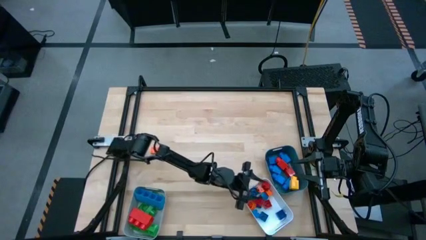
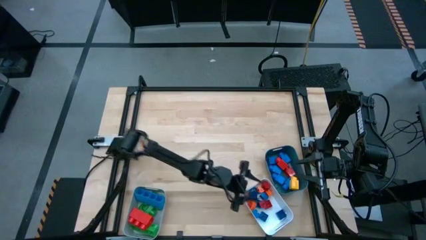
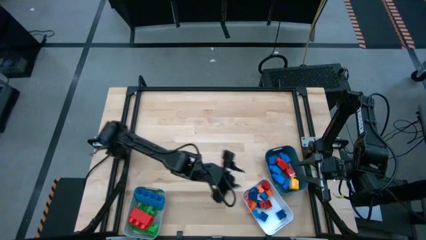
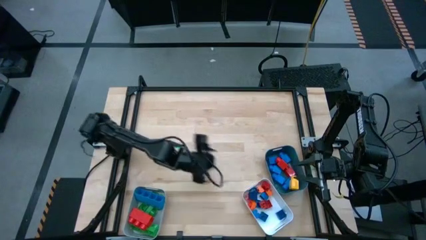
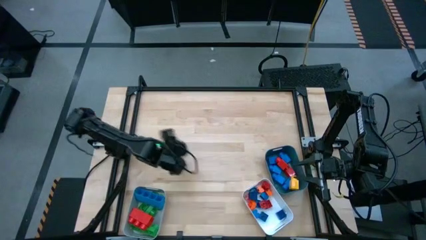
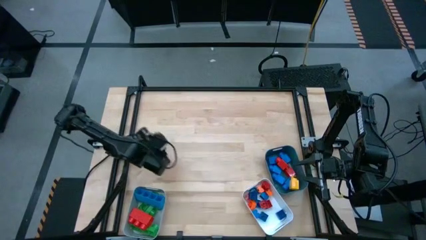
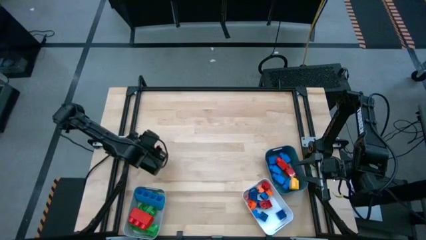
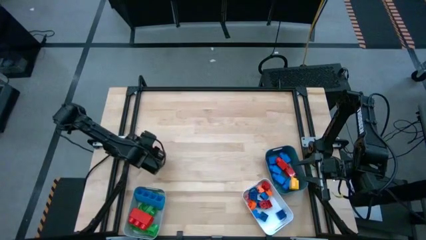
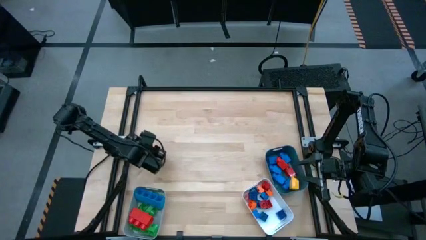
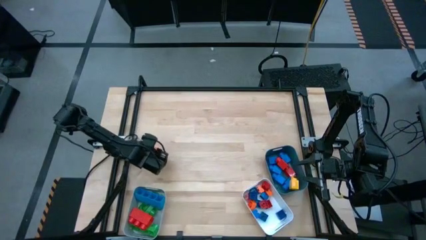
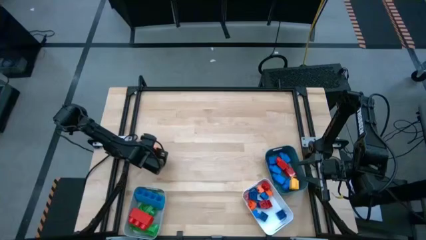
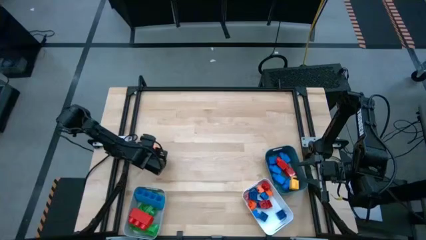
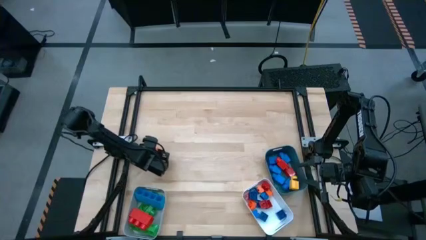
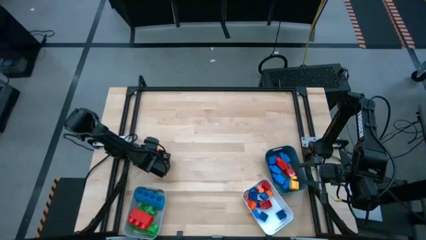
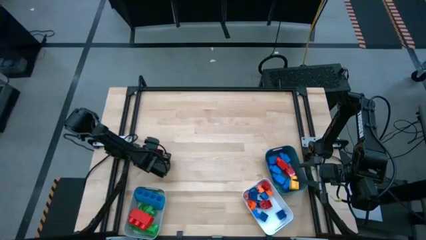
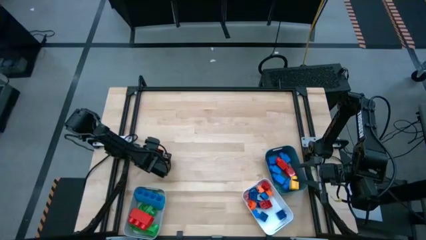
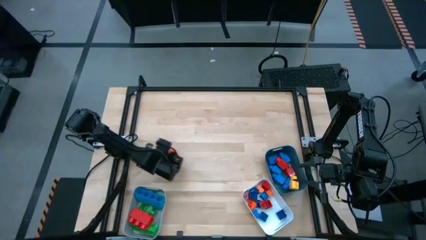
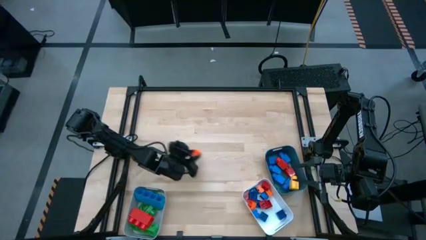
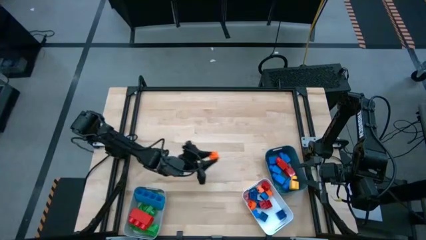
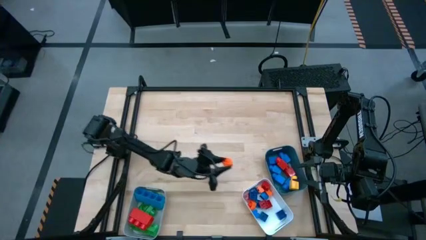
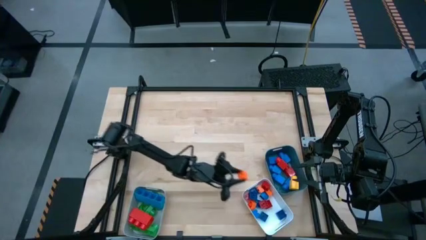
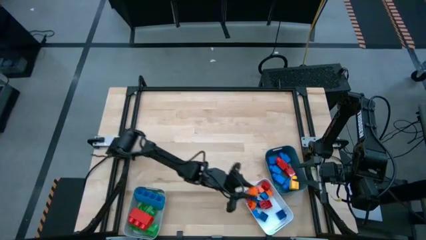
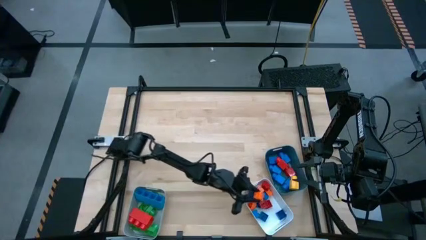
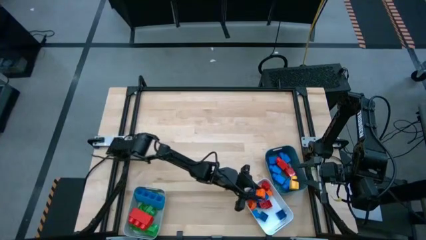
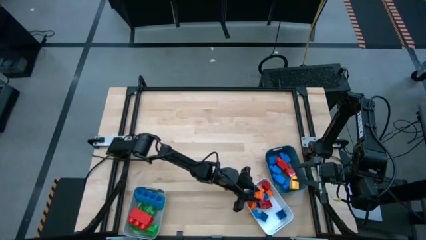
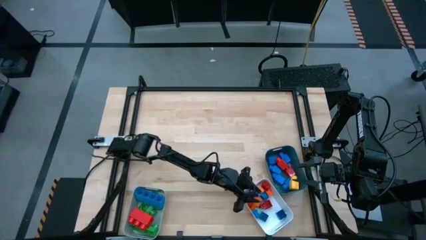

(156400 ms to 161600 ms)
Task: Sort blocks by size
Put the small square orange game piece into the white bin

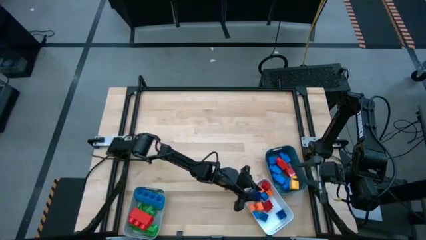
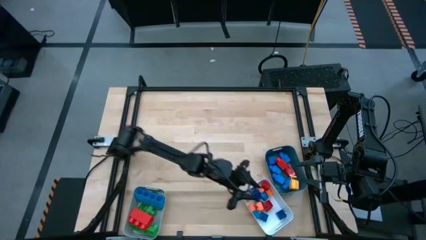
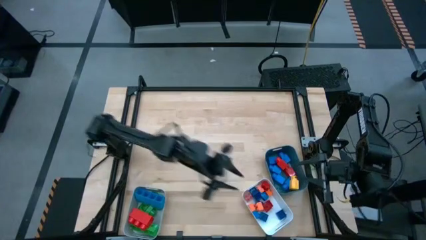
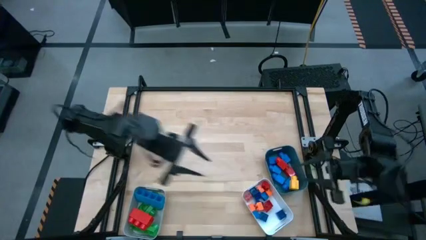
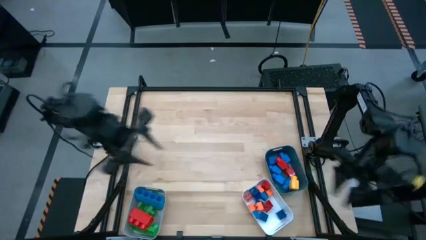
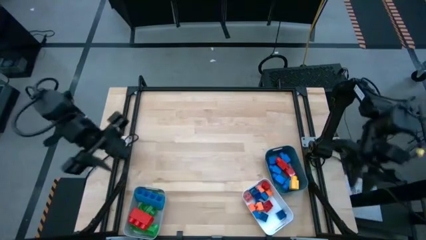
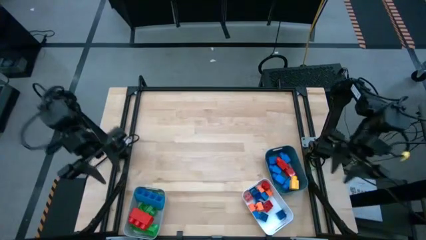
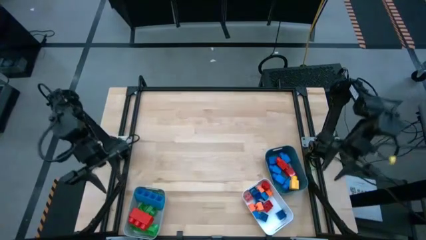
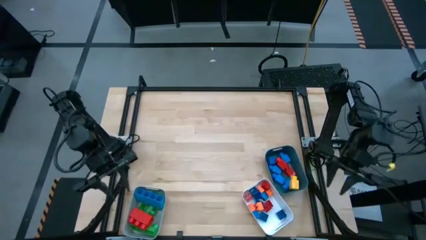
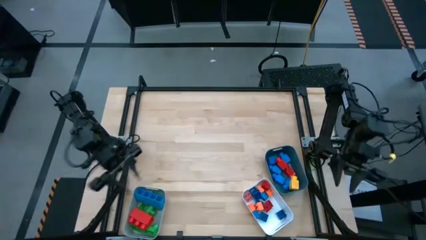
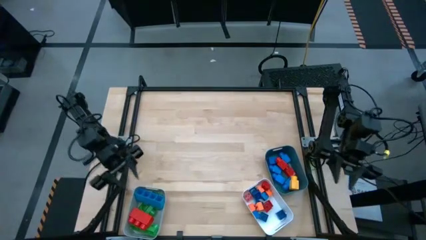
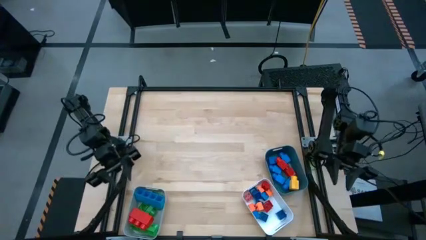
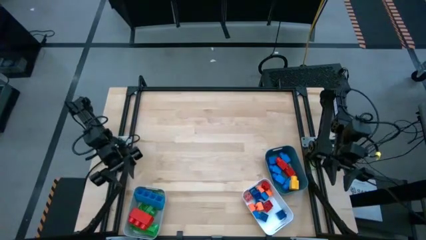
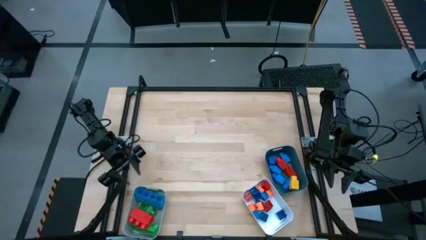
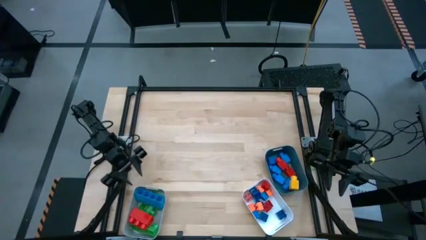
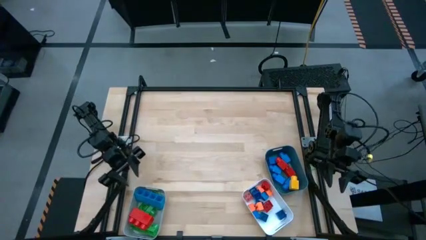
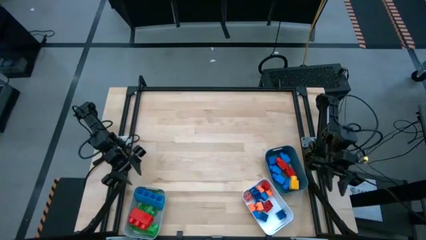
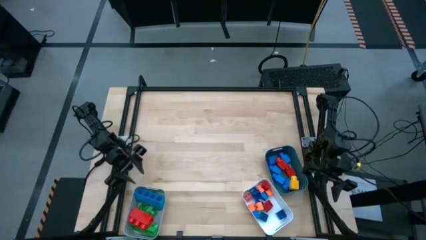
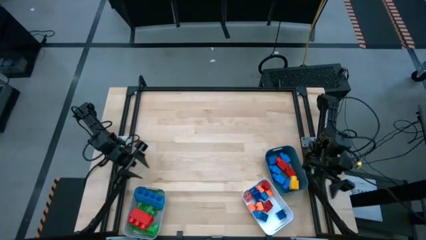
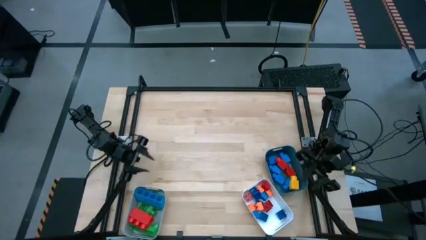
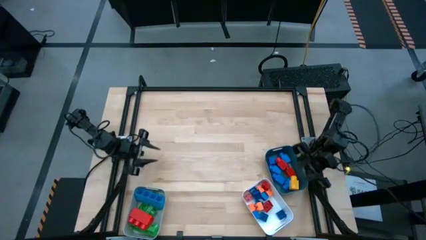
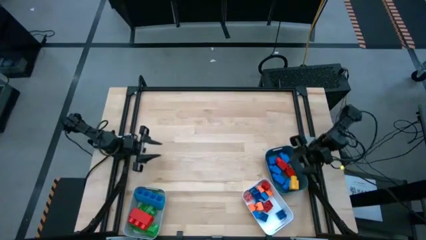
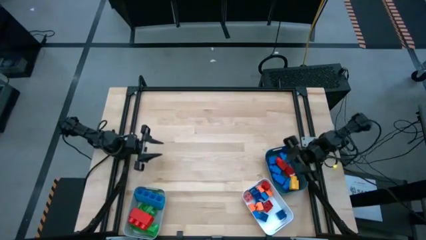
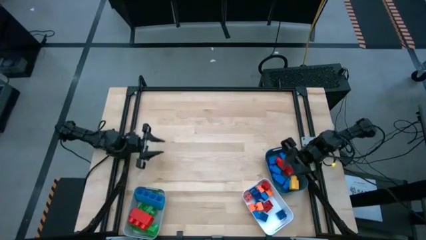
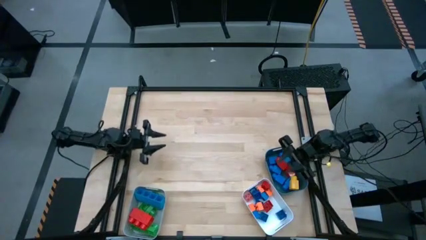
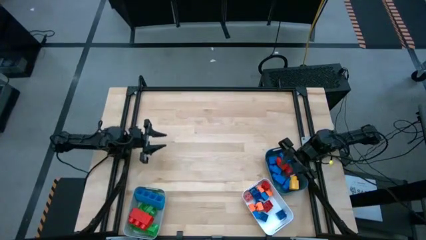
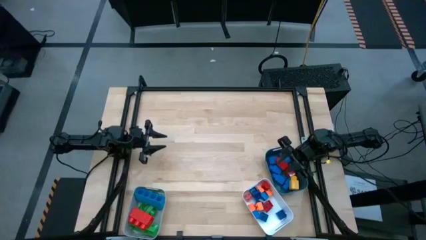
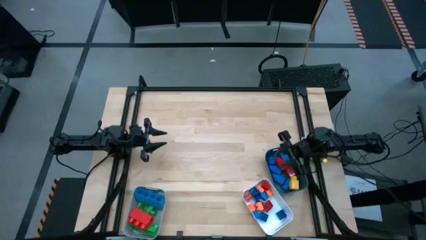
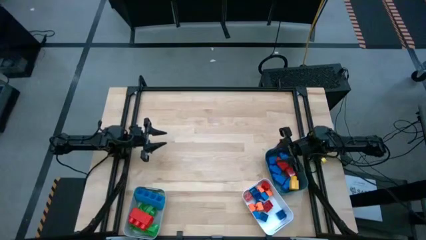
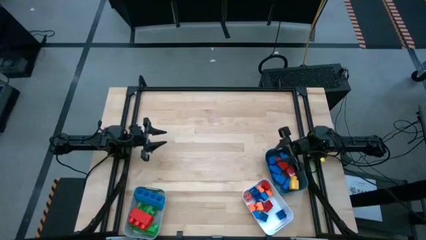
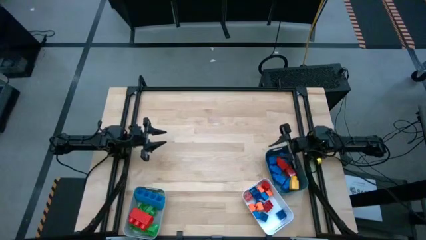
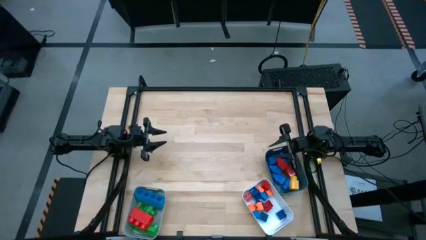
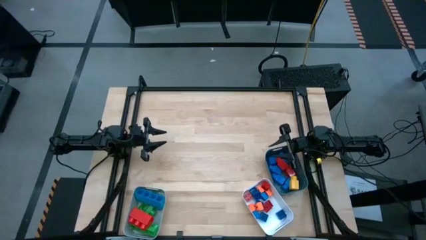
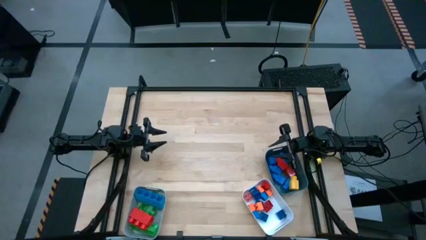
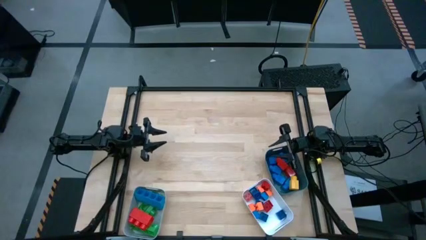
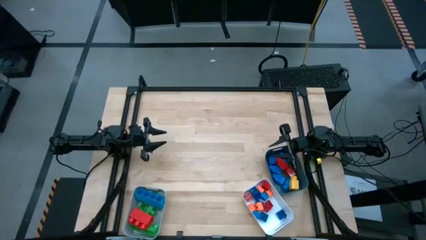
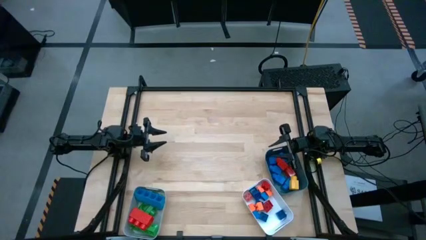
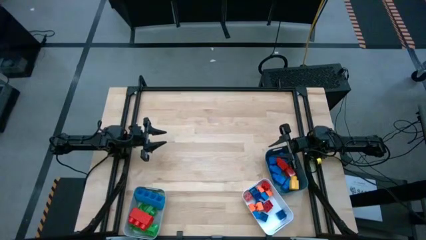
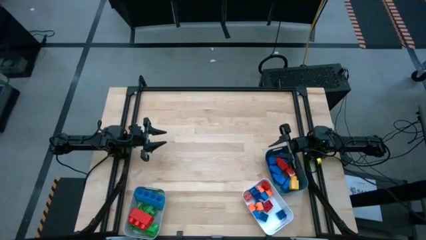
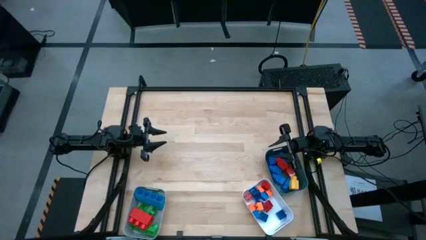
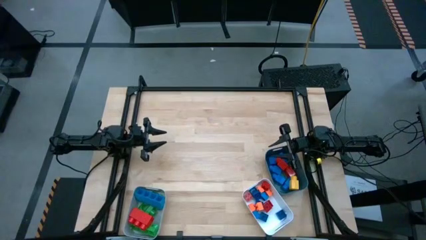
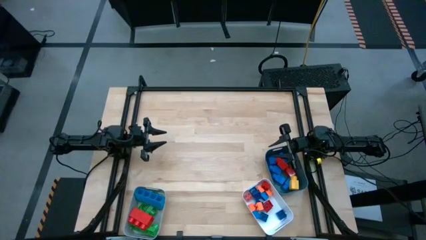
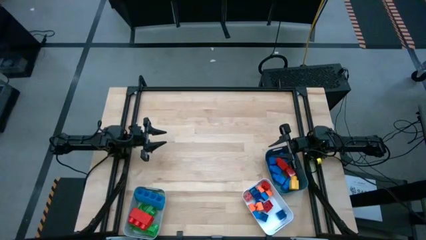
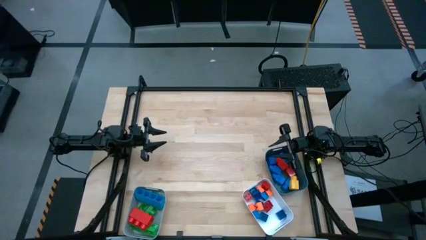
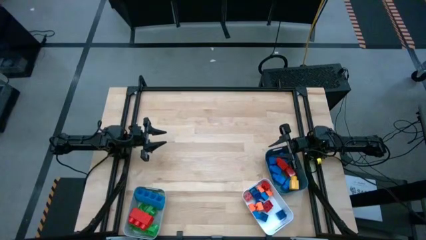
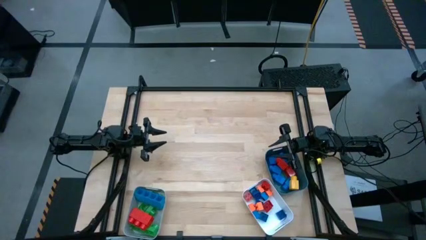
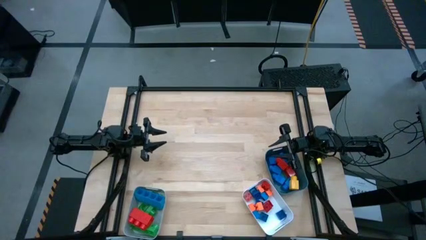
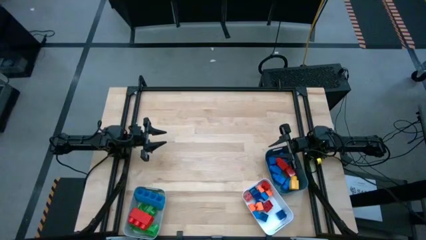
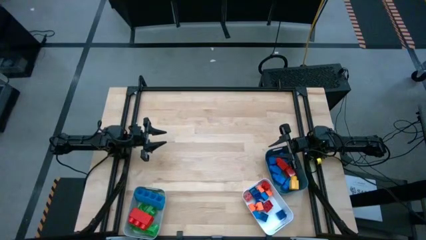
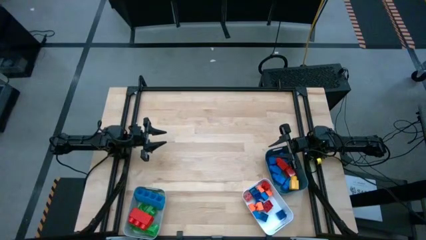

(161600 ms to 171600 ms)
Return to Home Position

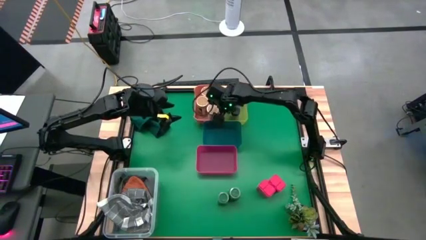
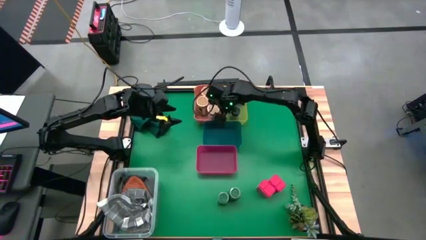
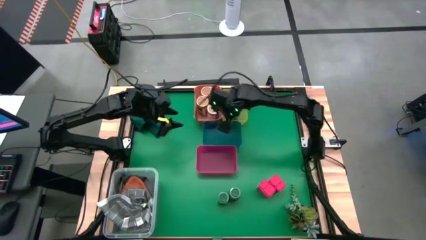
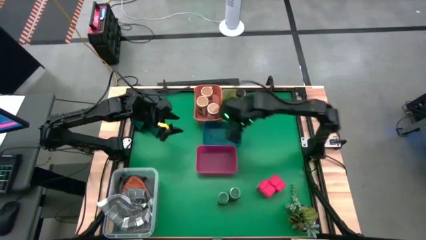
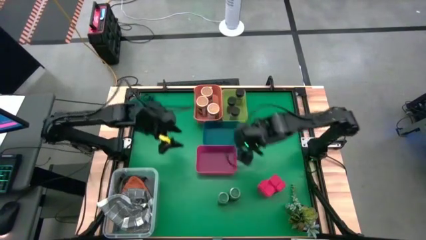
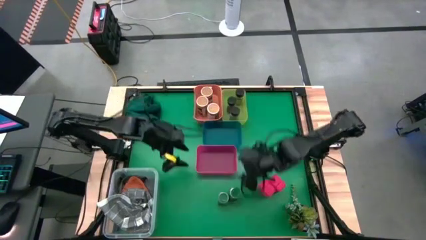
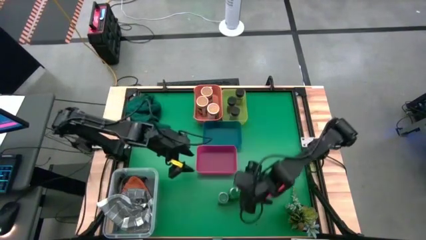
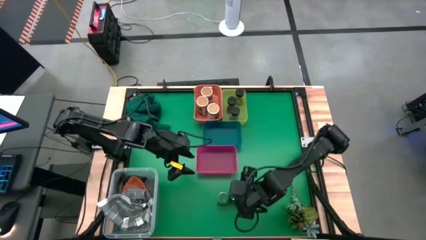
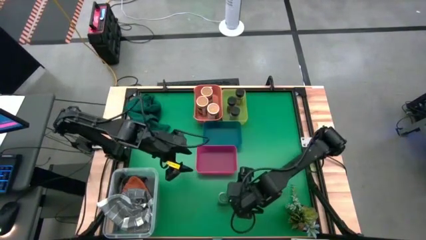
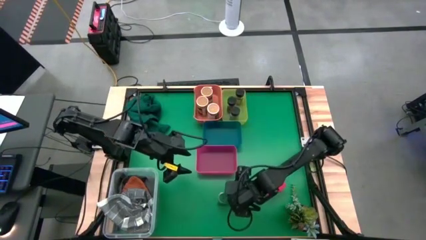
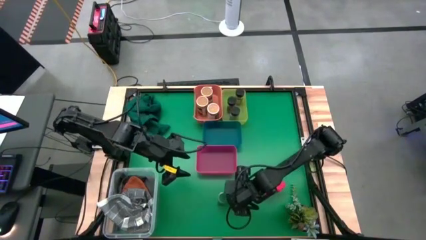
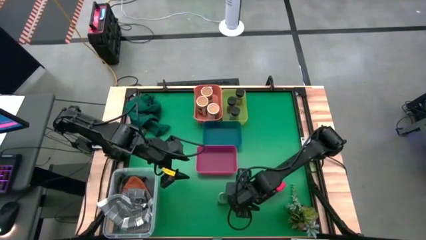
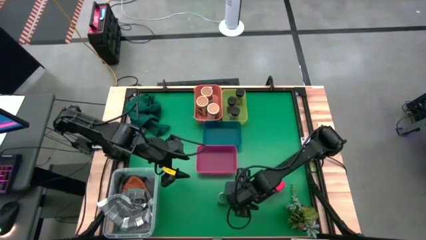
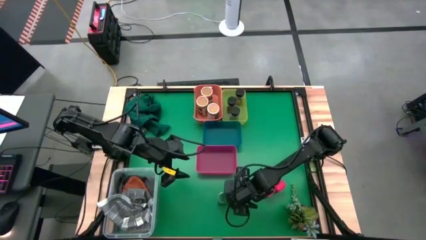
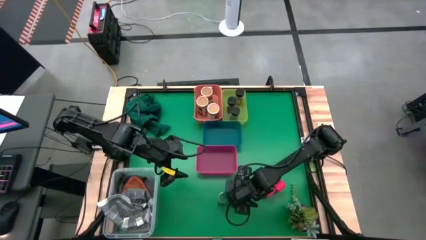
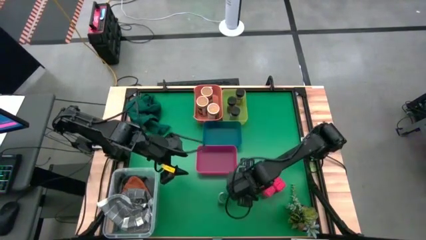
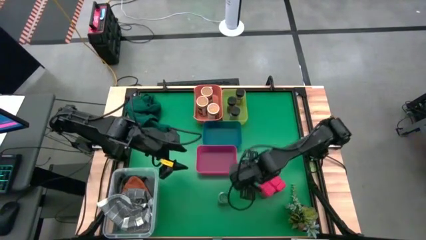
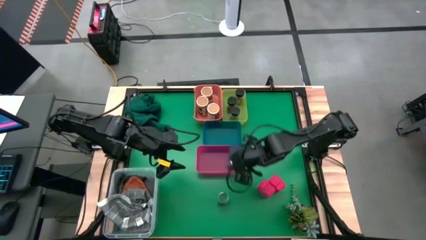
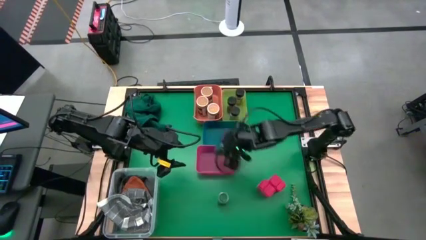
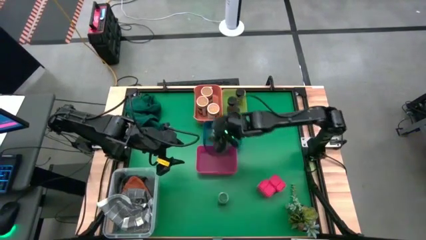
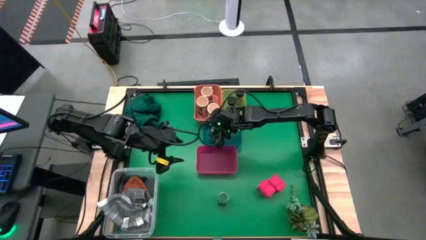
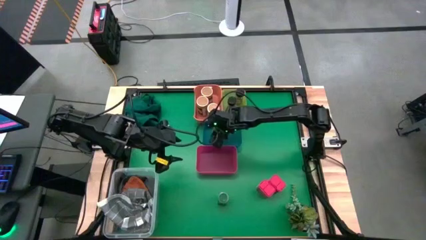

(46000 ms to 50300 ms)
Task: Sort spices by type
Put the right green seasoning bottle into the blue bin
